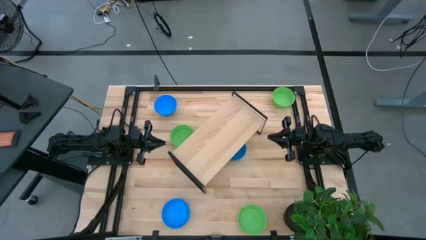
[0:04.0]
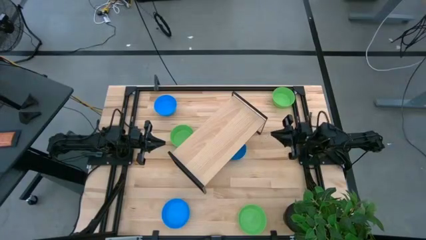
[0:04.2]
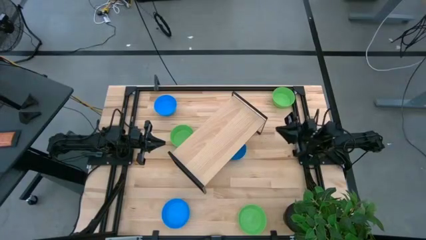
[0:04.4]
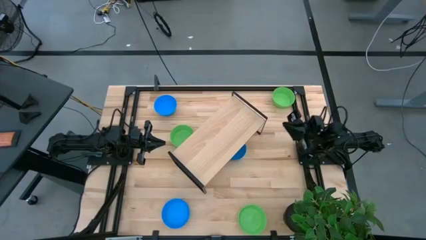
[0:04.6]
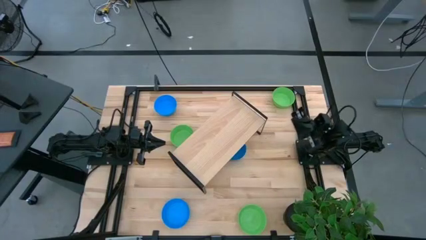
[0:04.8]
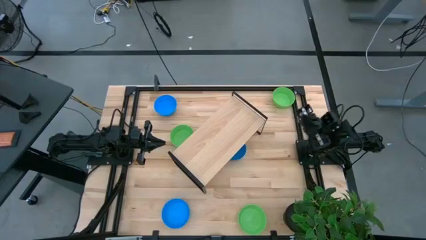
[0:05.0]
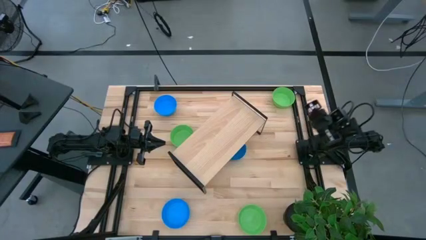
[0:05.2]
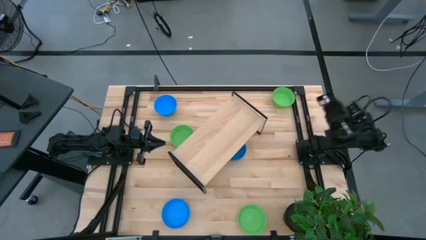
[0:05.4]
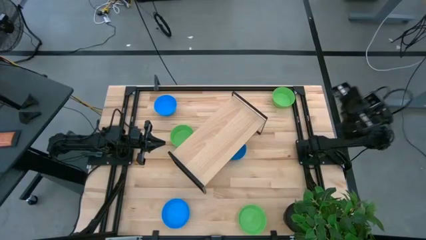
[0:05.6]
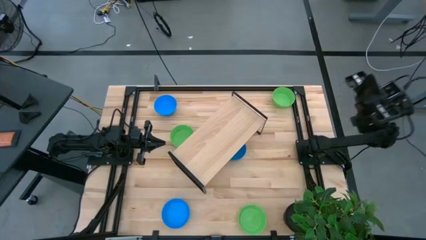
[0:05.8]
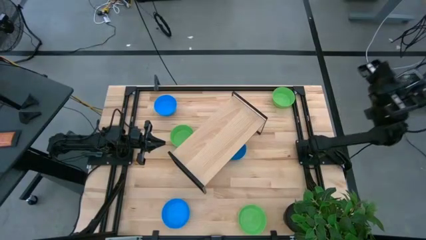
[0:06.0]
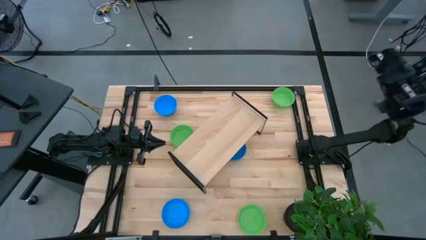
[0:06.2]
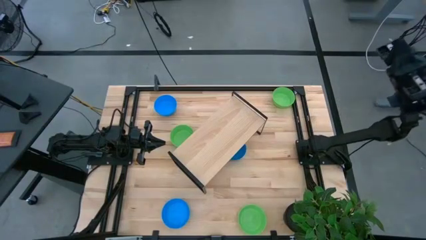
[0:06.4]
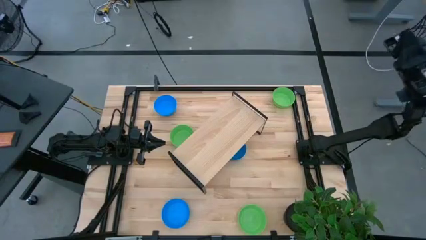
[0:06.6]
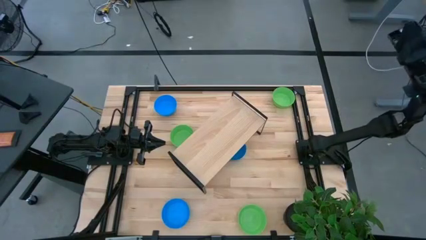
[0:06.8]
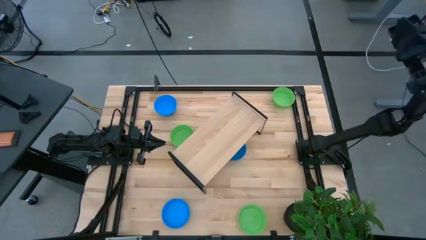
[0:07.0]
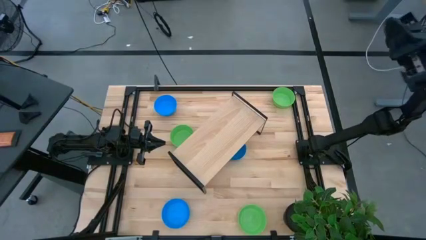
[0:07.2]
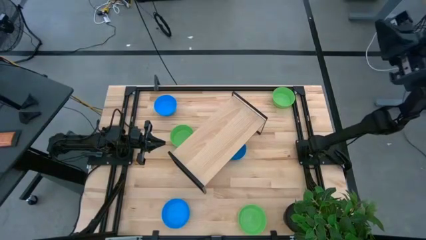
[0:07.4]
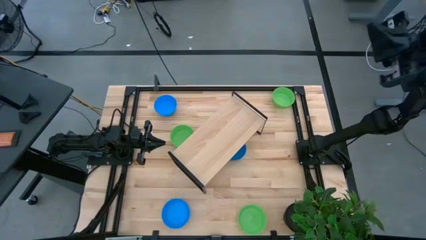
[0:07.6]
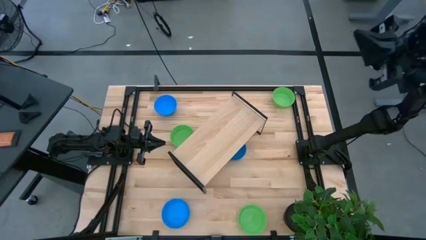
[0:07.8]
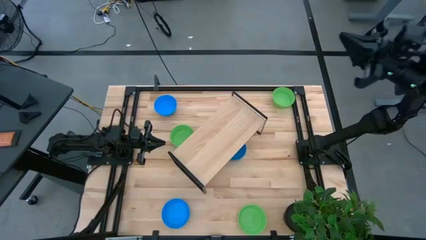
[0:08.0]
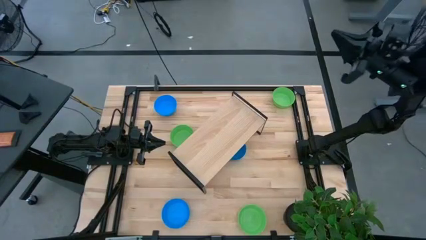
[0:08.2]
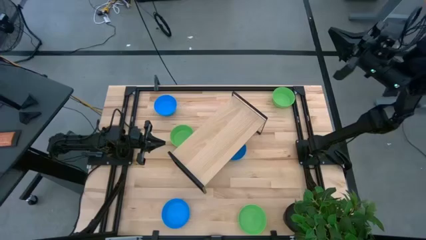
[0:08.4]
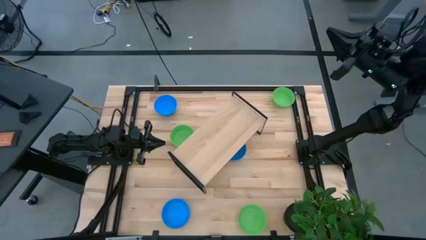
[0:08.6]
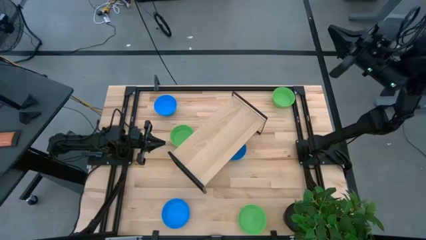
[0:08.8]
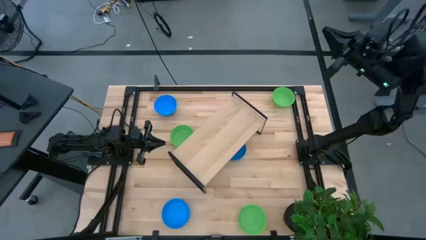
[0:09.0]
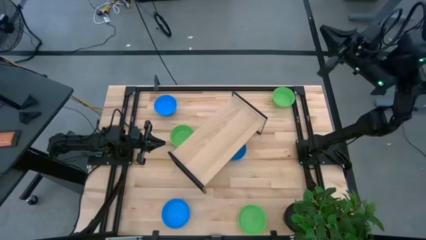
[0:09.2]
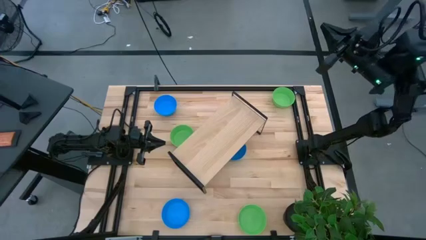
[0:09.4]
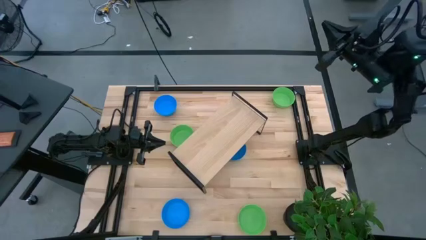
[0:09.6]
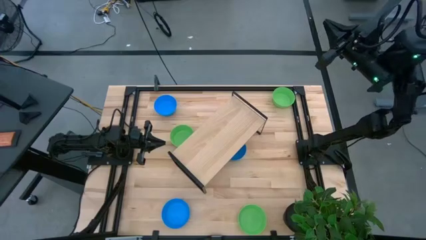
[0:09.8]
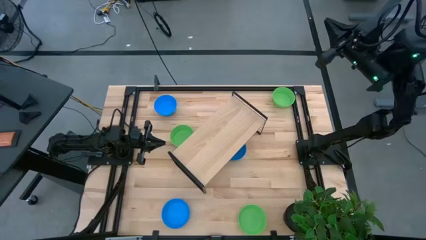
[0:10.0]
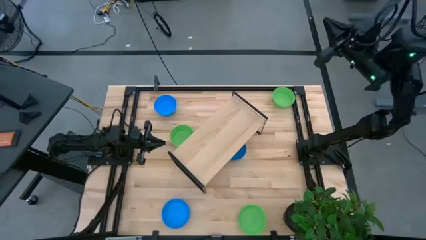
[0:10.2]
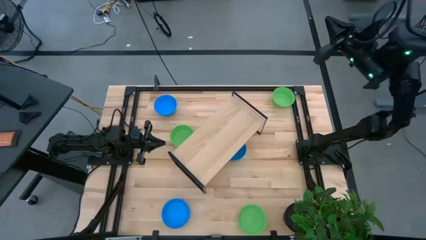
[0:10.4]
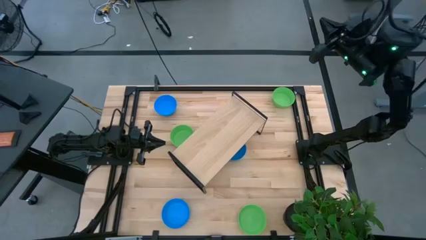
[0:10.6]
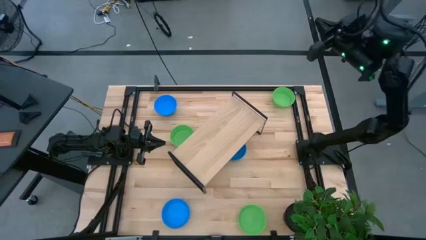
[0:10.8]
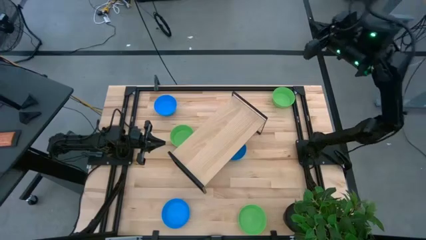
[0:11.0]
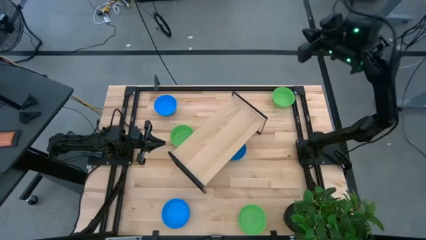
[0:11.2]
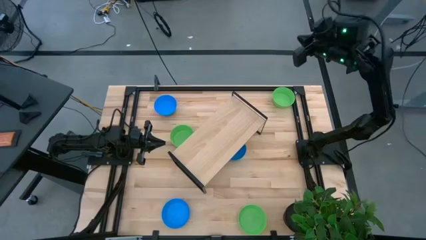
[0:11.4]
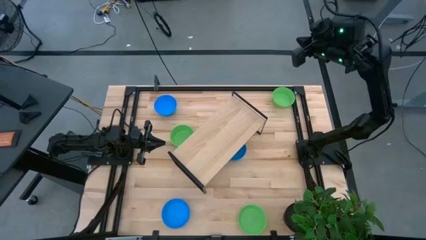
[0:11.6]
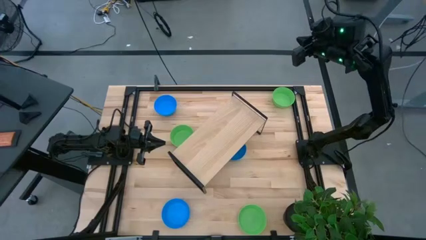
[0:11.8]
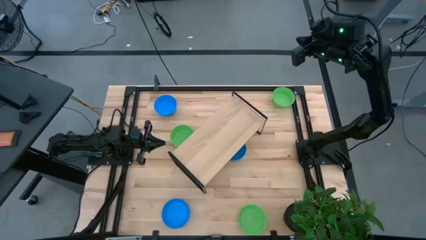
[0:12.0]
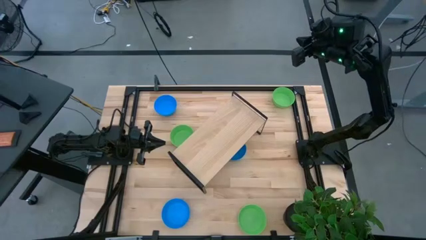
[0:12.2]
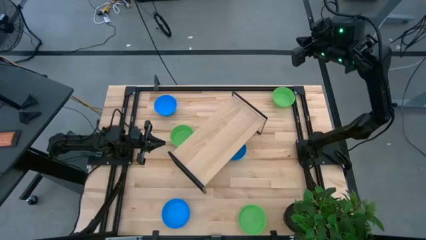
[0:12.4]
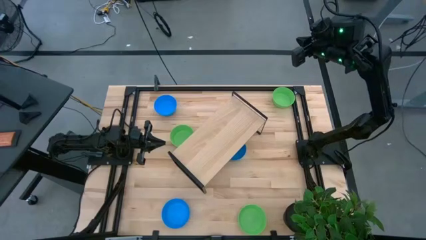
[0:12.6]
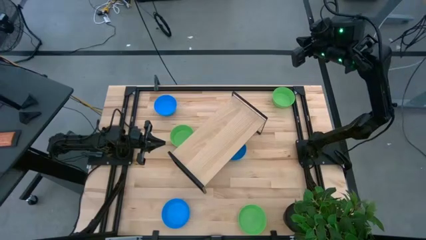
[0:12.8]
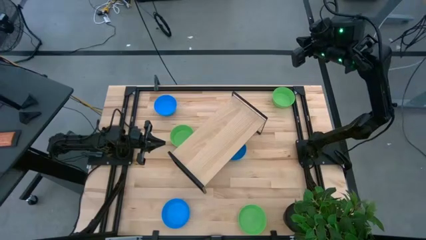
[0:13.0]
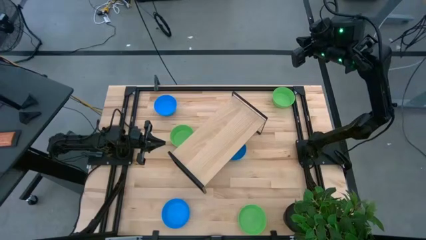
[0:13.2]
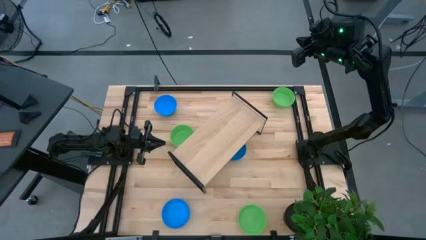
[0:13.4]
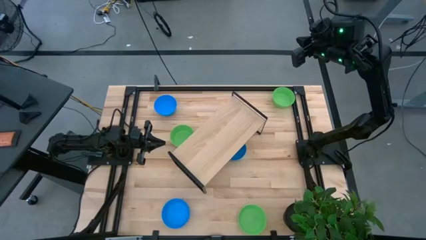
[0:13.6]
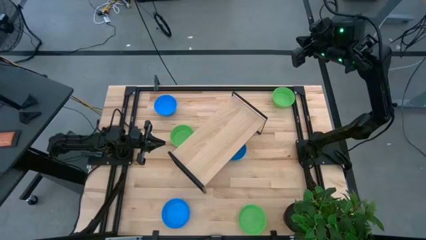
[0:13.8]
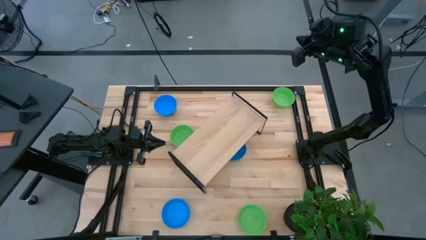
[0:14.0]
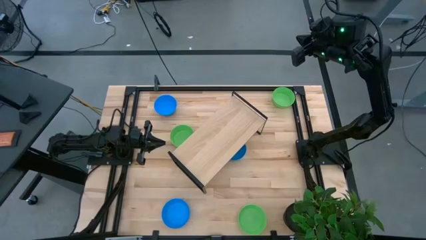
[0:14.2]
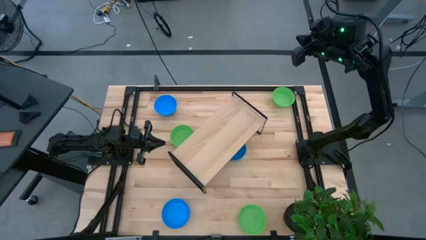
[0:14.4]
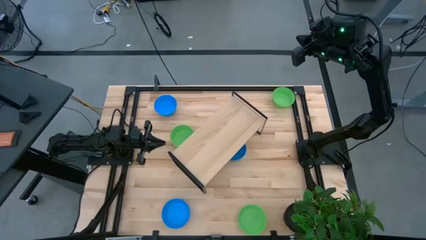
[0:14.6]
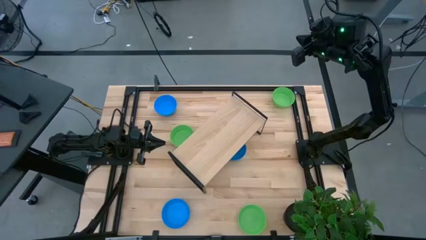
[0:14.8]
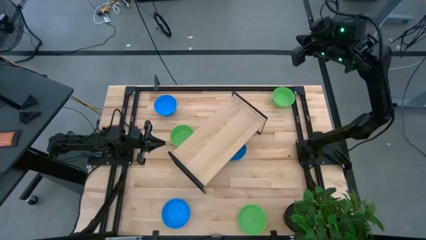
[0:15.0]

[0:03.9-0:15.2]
Task: Pick & Place Mini bowls
Put the top green bowl on the shelf
